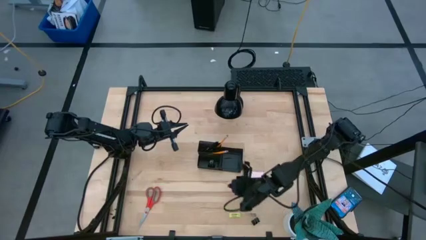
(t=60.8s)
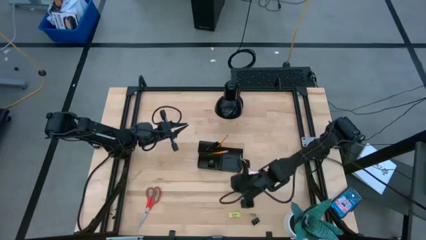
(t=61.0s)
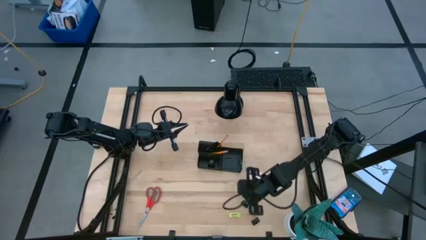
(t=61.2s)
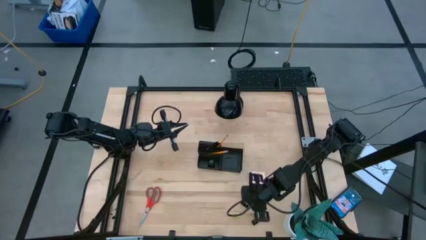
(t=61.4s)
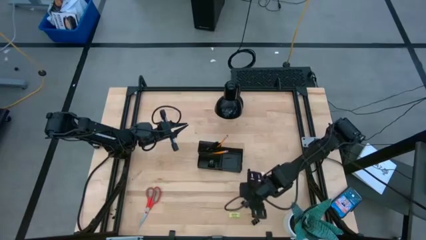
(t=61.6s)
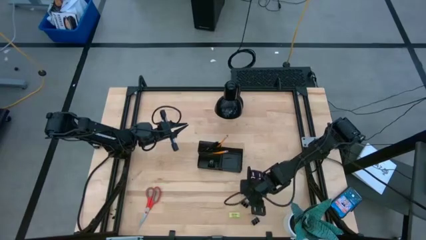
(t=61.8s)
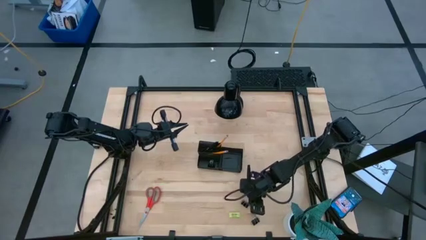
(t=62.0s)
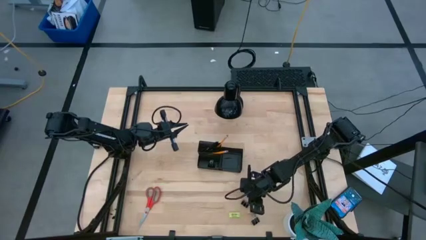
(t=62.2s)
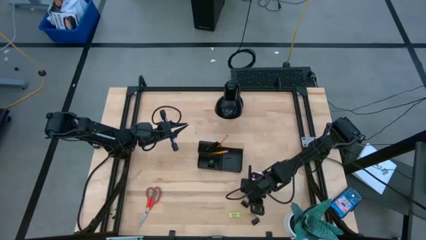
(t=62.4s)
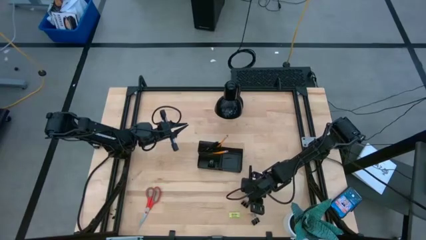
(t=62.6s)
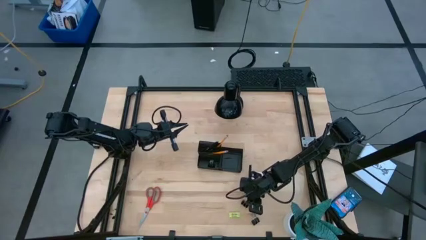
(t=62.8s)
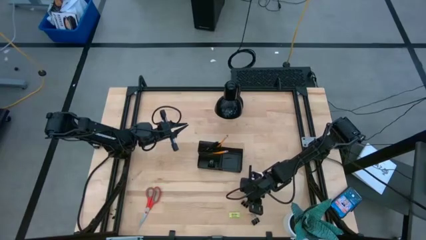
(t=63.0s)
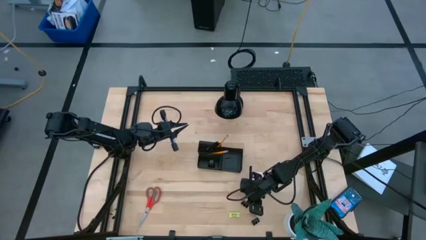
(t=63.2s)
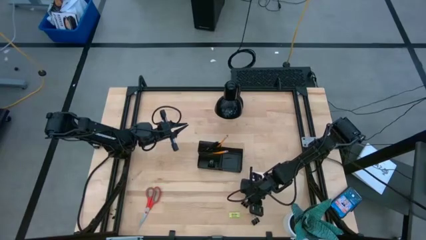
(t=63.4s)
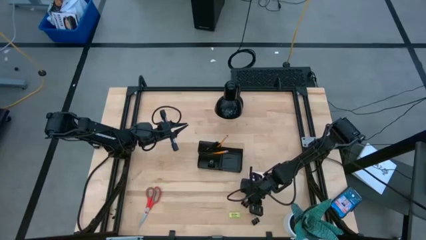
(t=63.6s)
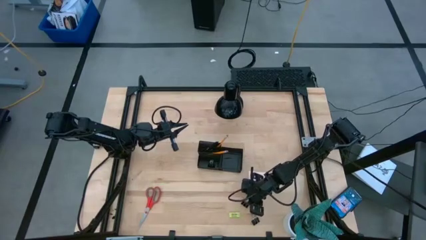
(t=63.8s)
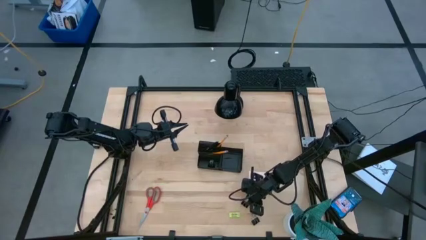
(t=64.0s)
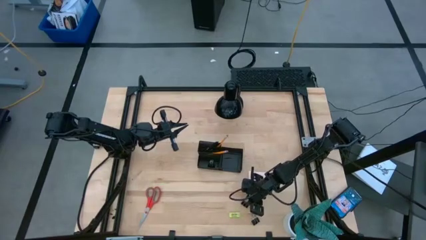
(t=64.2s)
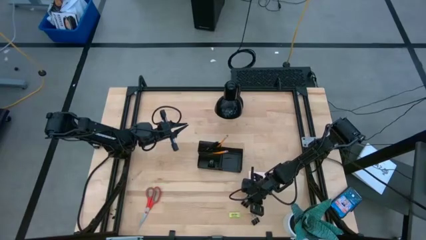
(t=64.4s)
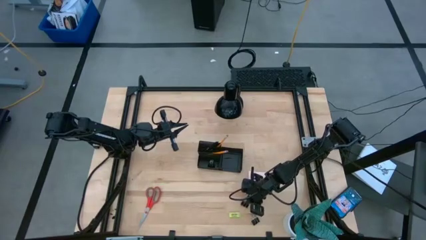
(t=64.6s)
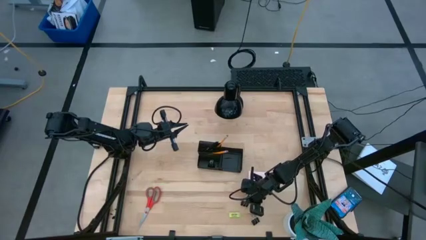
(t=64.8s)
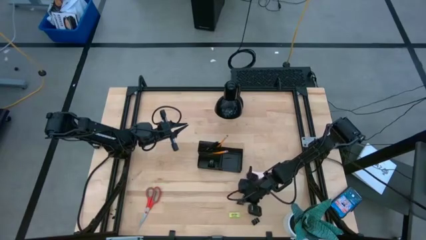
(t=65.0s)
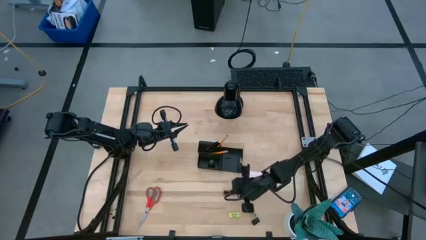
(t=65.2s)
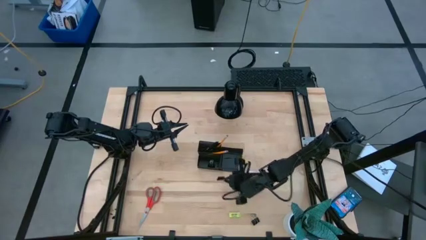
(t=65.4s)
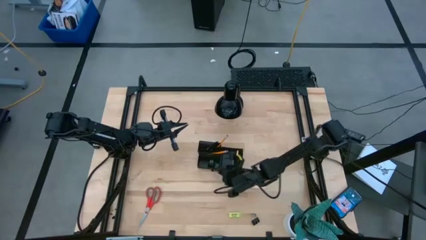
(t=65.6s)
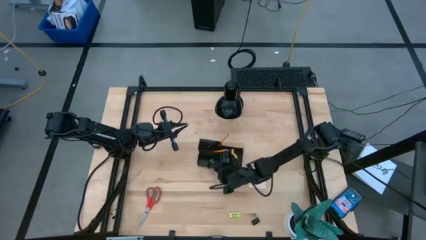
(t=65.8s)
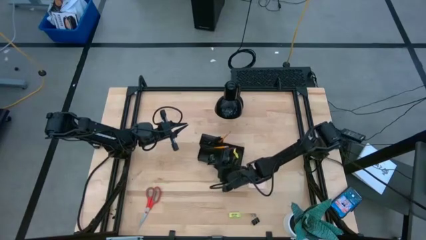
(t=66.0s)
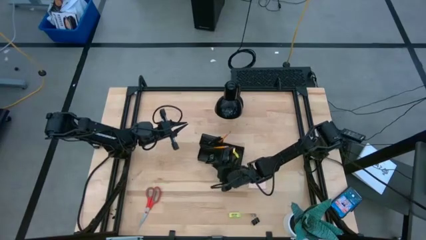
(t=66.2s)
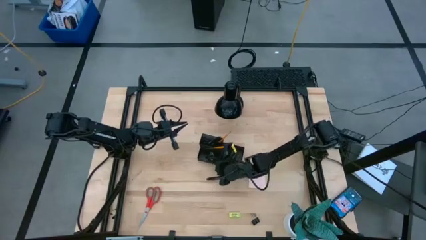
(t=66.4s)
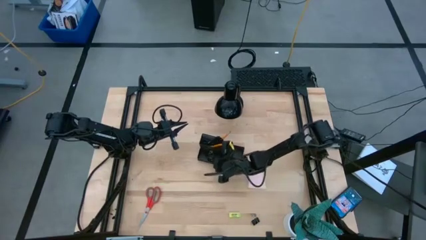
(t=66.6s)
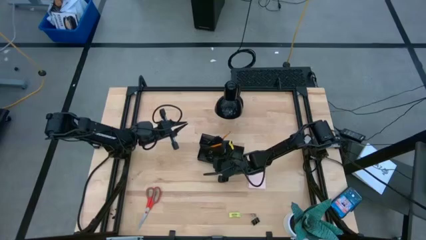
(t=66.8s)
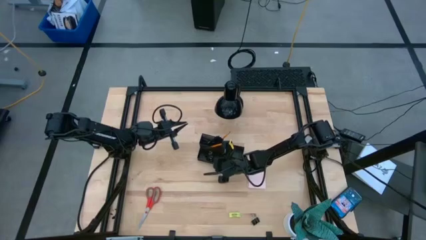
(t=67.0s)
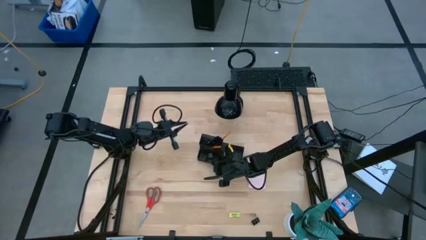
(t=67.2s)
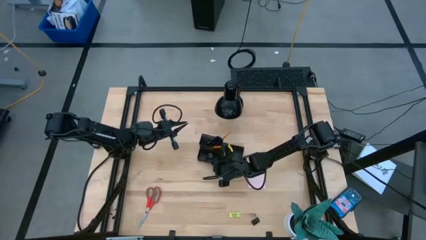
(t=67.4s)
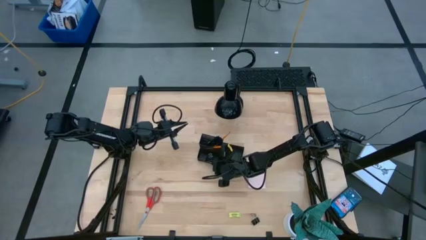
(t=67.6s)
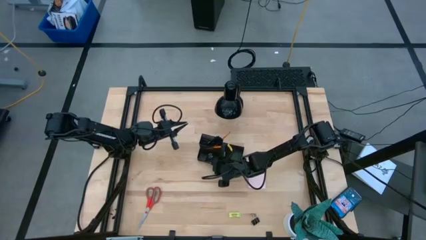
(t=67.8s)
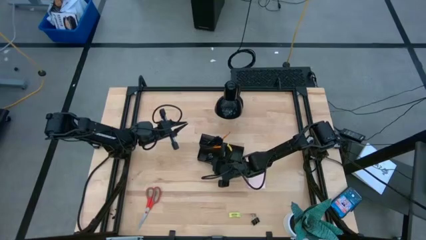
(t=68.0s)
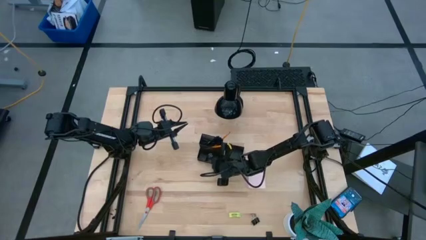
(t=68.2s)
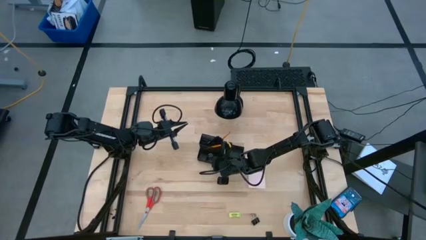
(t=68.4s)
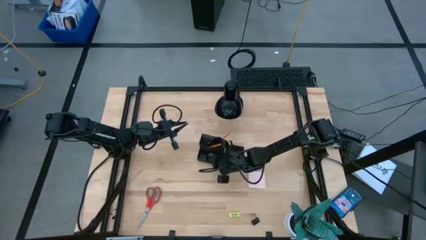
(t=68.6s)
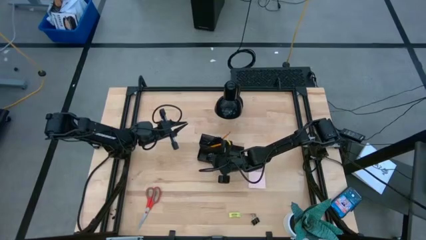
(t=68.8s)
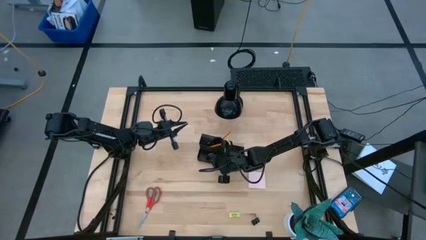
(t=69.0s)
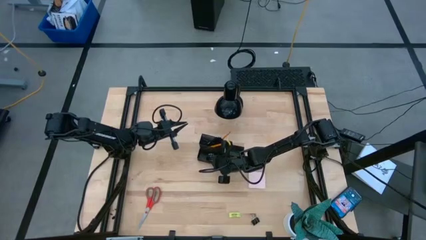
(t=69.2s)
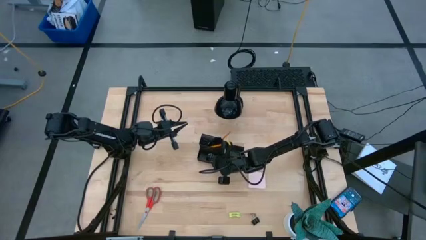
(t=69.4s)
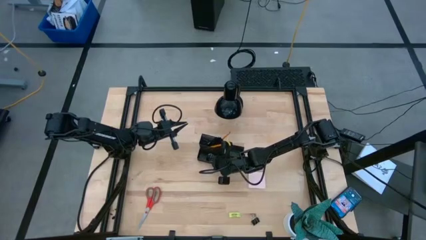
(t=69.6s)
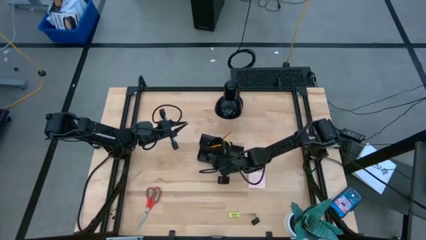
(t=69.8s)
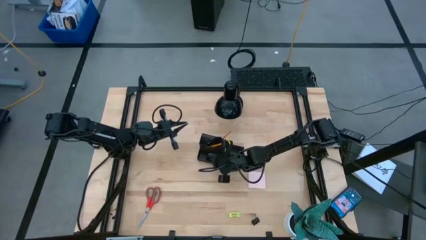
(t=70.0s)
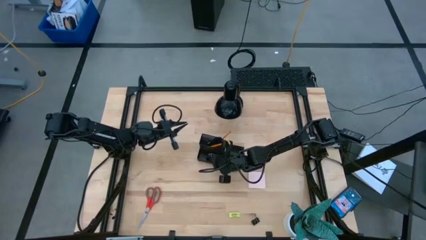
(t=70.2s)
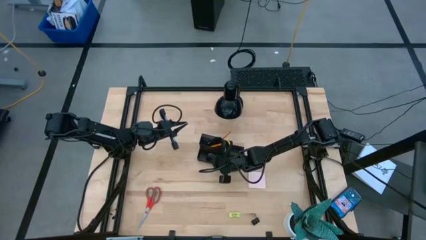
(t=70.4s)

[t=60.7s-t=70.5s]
Task: Pick and place office supplies into organizer
Put the black binder clip into the black desk organizer

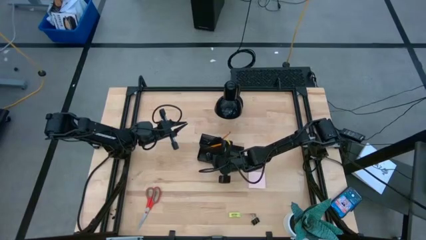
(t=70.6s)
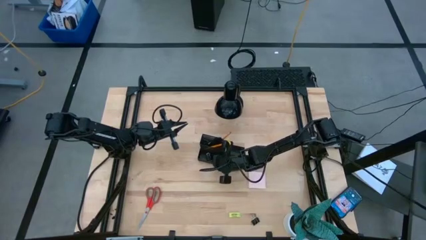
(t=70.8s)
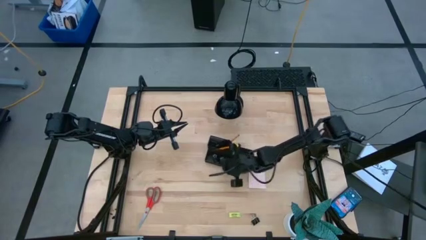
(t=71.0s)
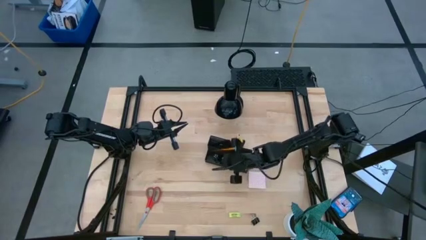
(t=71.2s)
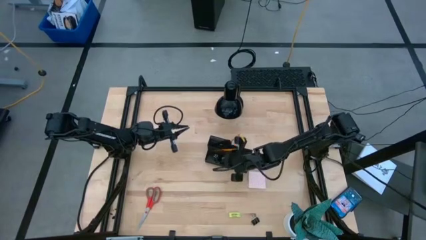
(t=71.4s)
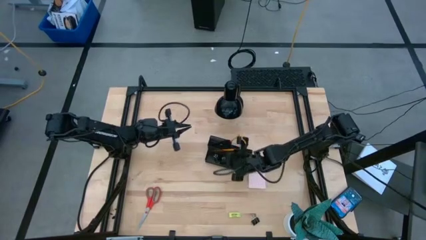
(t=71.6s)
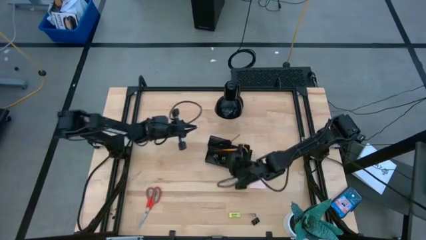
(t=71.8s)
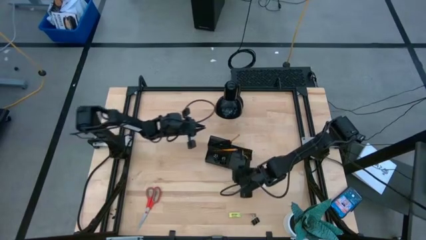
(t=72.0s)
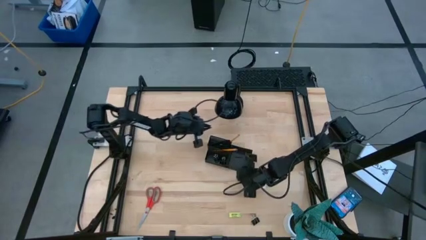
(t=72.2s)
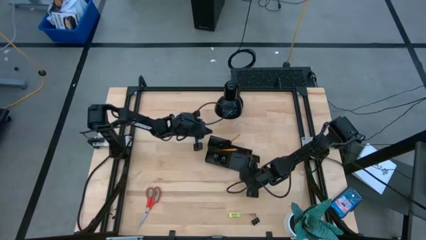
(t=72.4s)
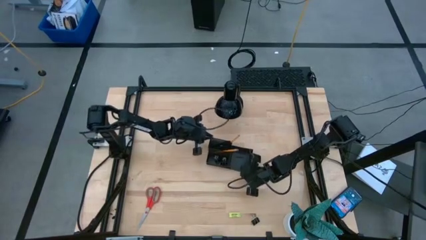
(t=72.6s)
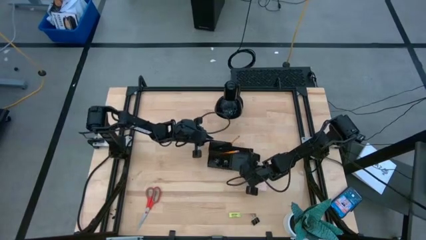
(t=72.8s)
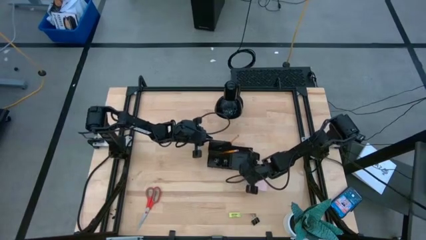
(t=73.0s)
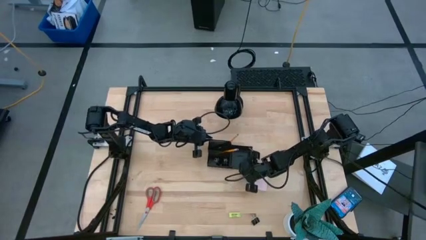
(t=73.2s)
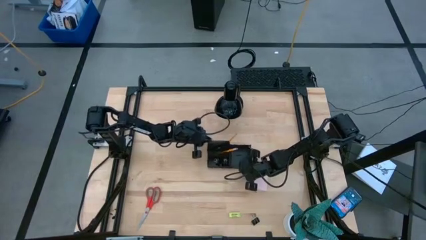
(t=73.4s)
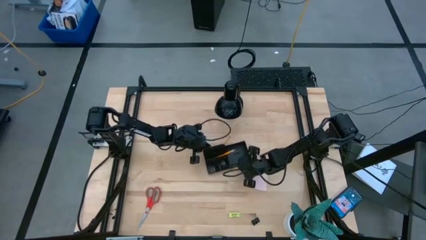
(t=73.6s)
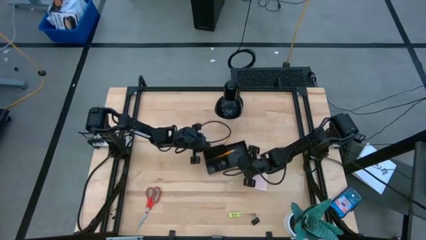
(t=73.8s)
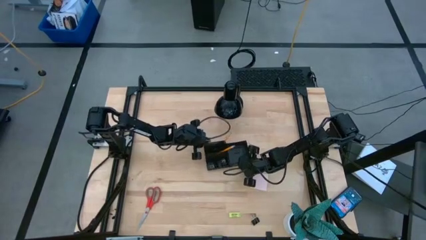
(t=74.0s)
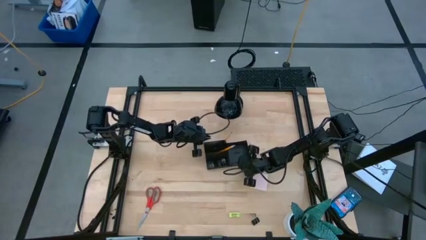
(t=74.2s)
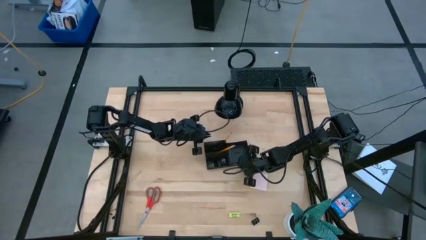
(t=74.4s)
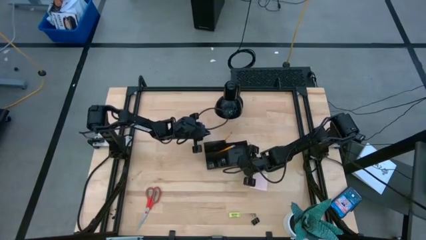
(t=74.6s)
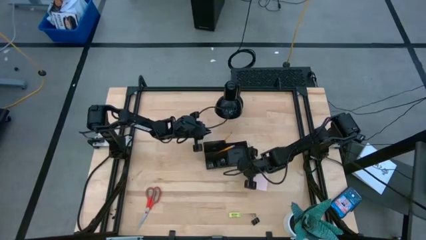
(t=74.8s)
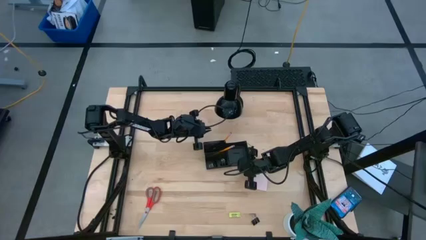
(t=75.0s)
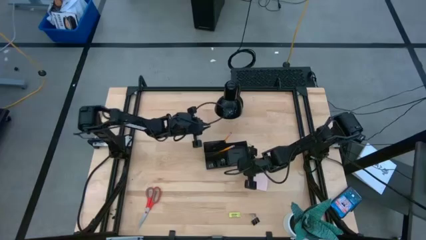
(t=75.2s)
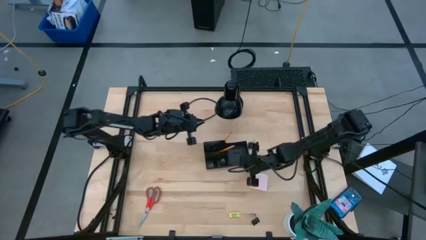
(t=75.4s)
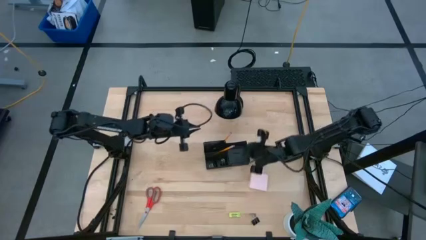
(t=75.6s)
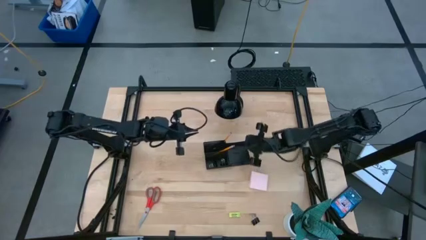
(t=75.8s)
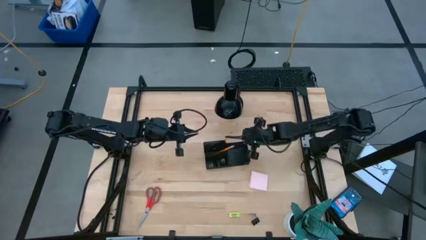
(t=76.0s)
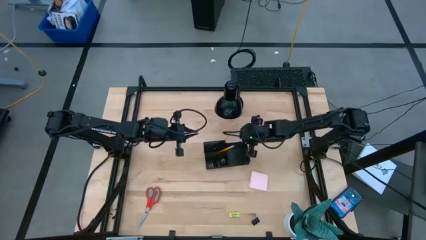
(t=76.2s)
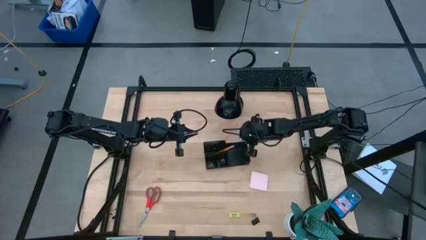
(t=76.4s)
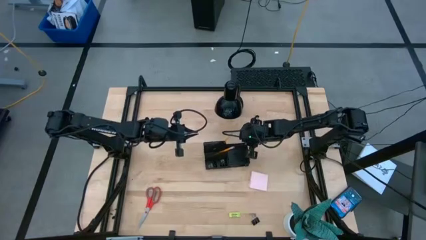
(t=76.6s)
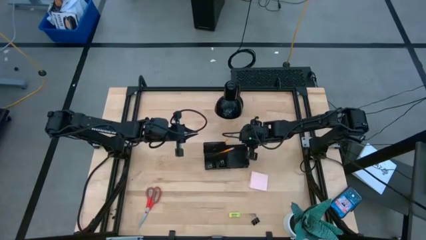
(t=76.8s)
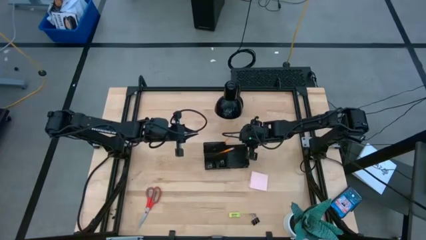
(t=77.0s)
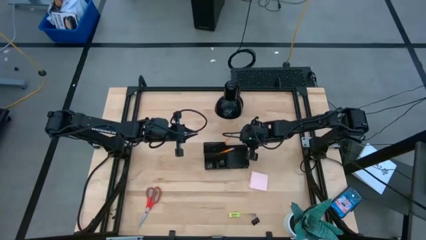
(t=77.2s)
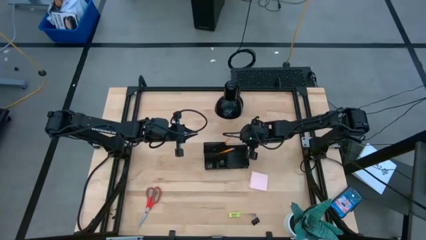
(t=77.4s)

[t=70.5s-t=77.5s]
Adjust the black desk organizer
